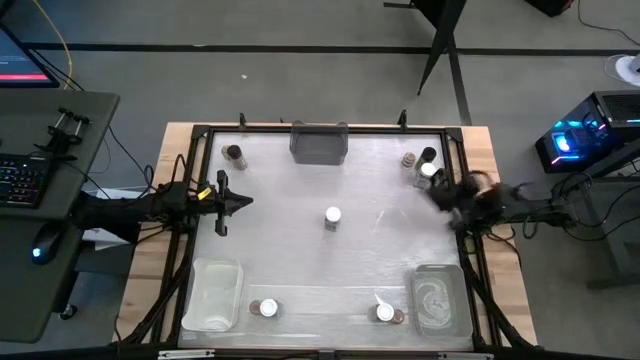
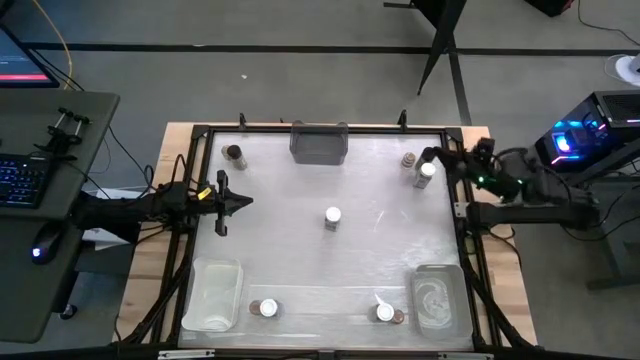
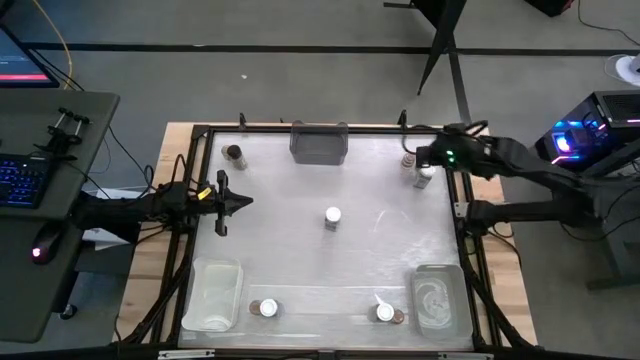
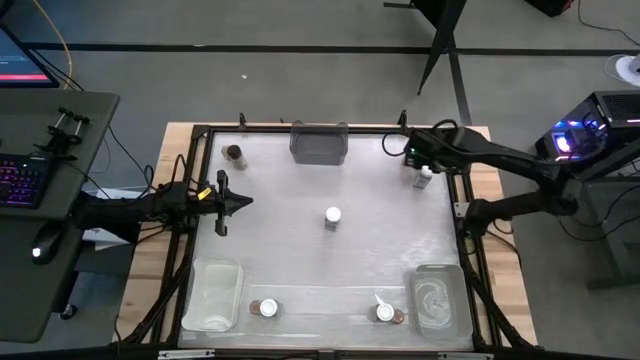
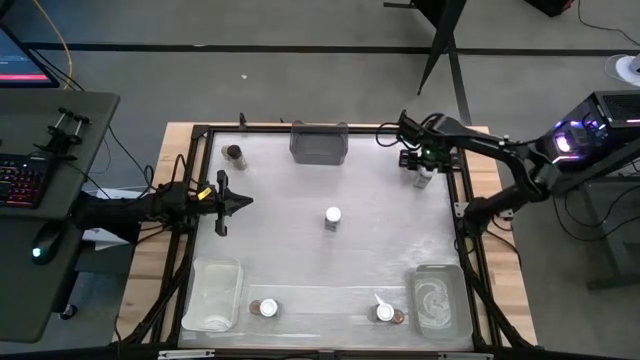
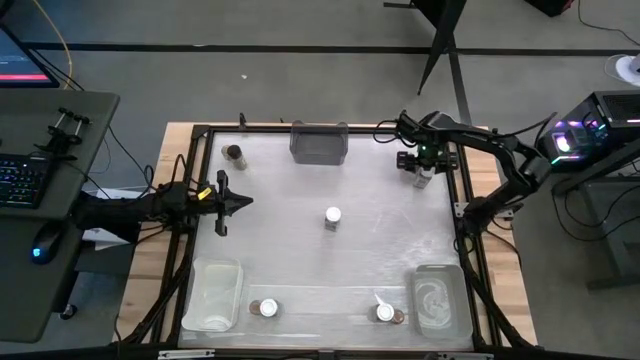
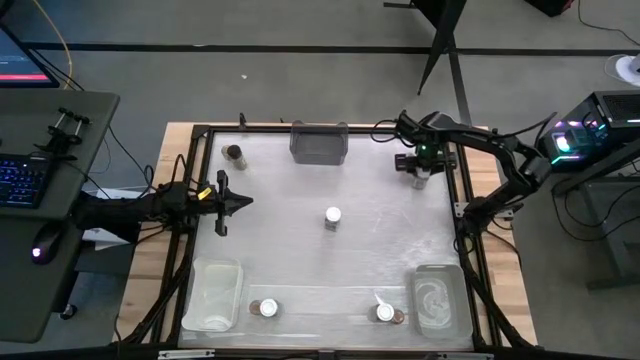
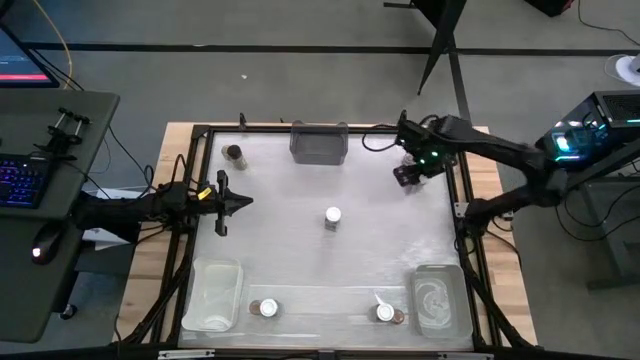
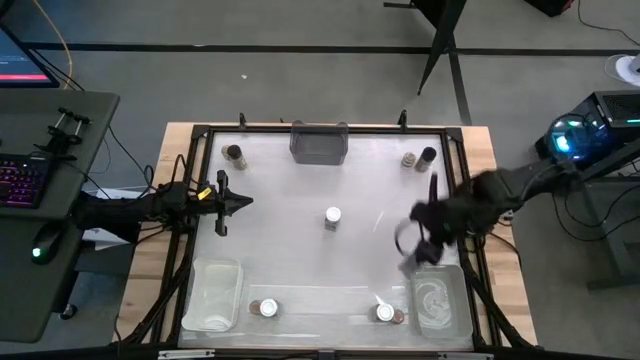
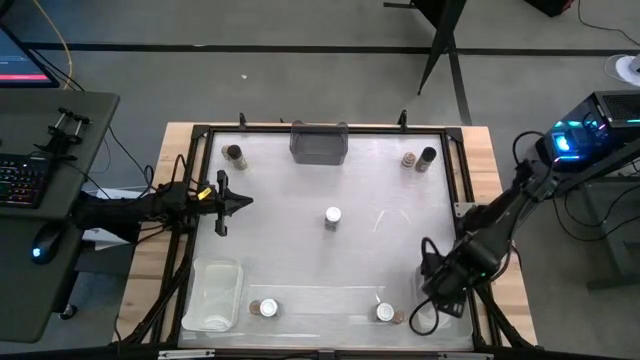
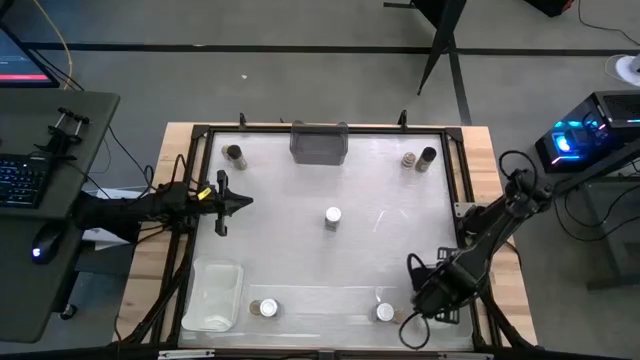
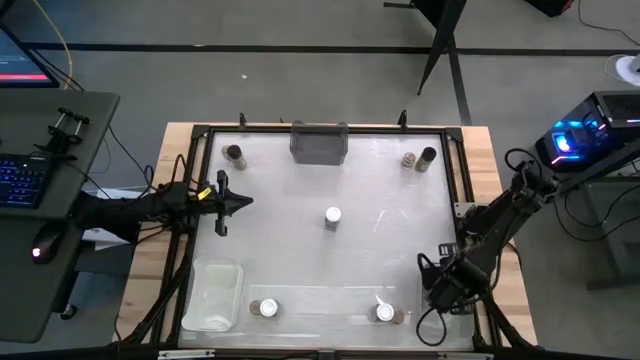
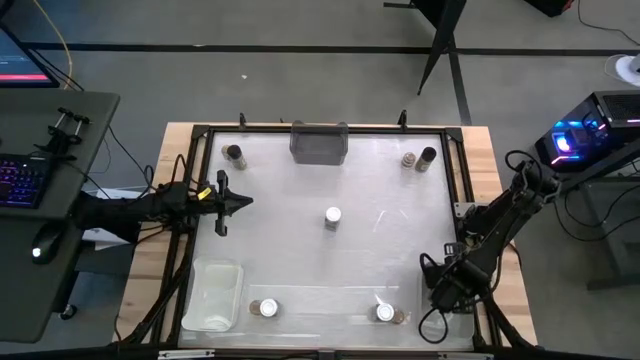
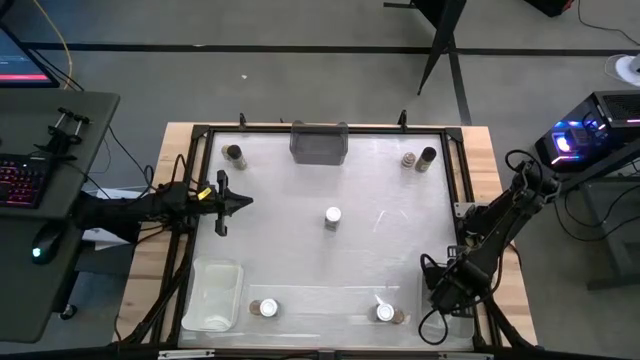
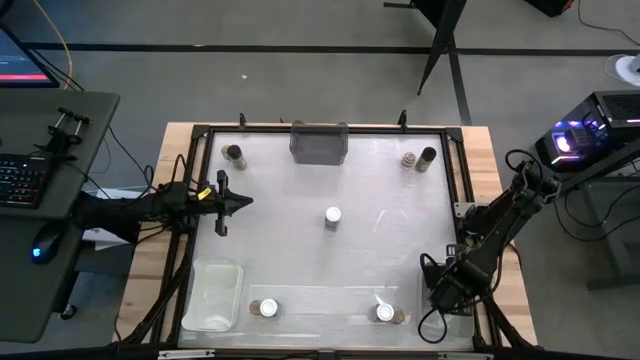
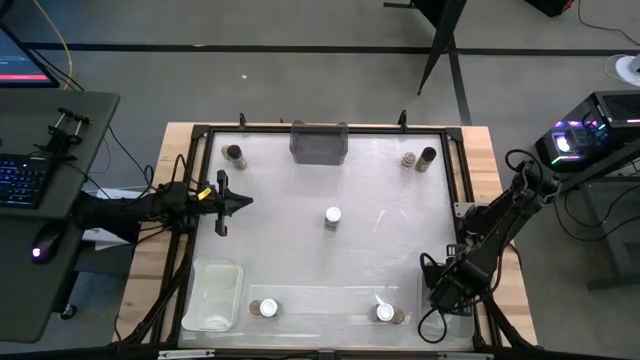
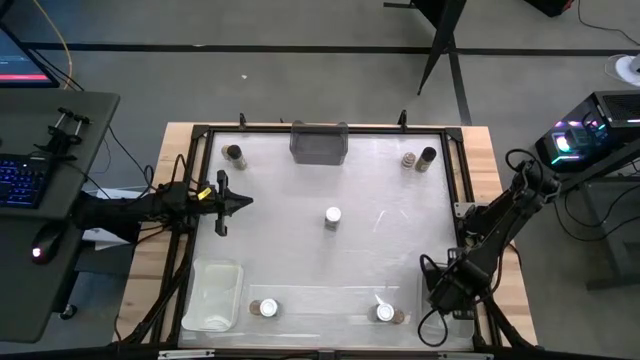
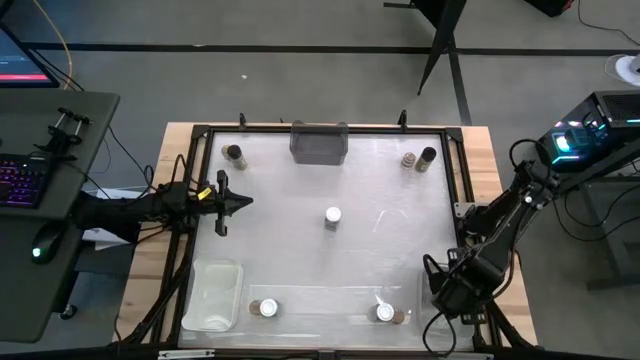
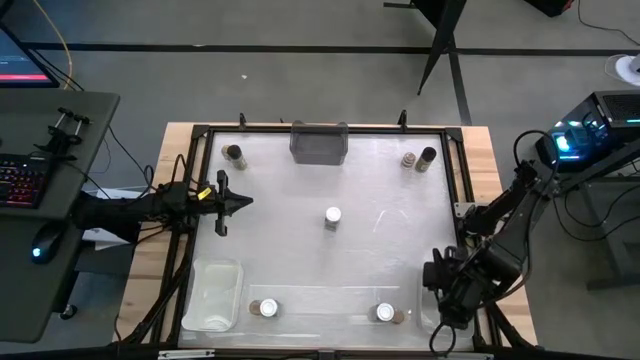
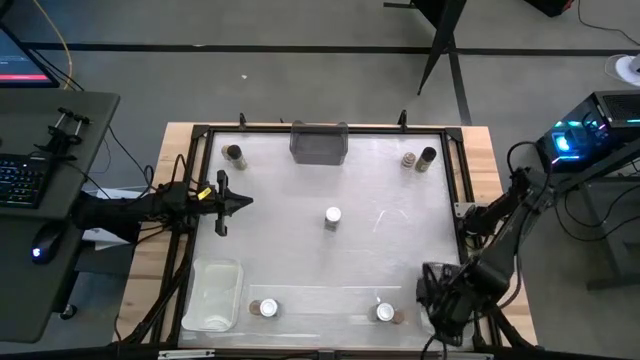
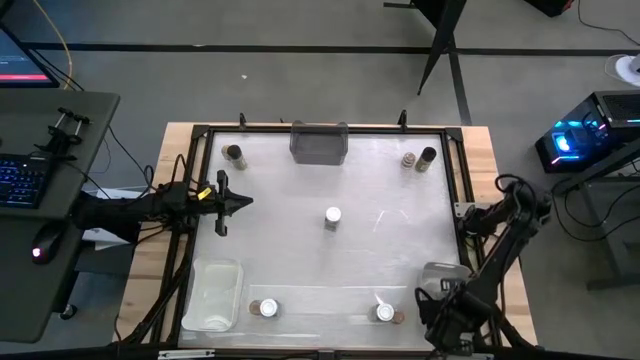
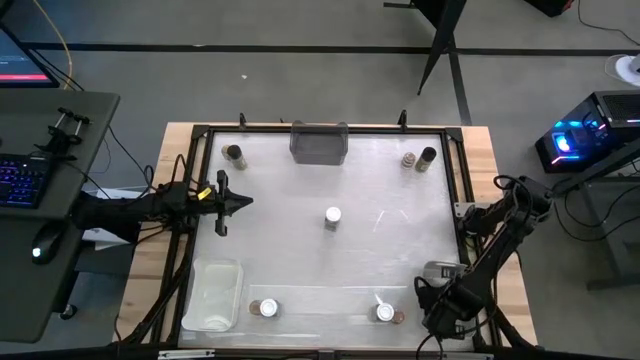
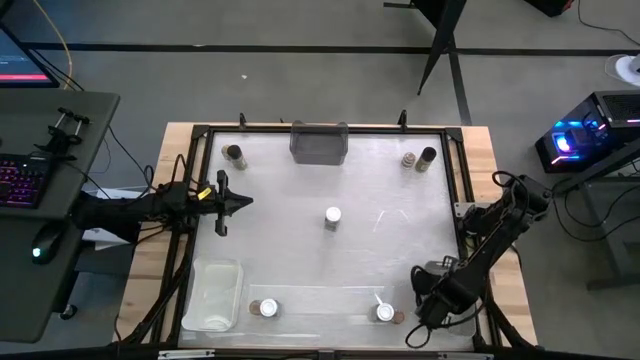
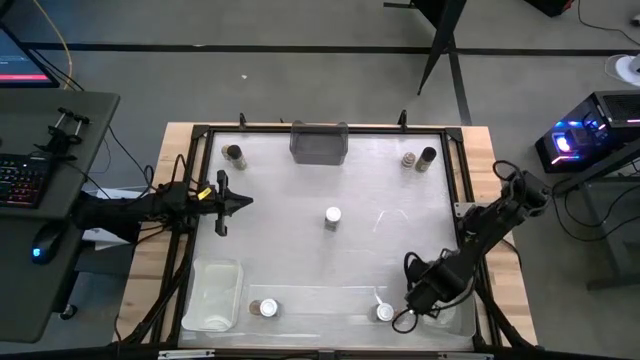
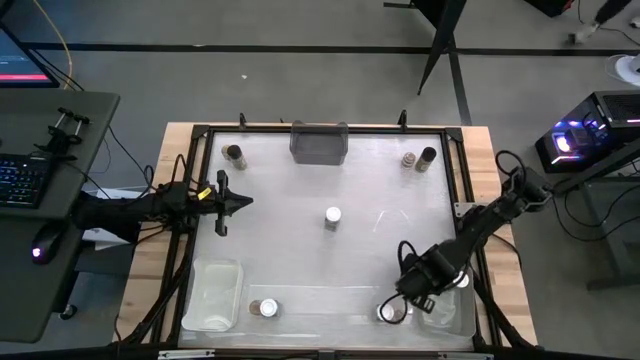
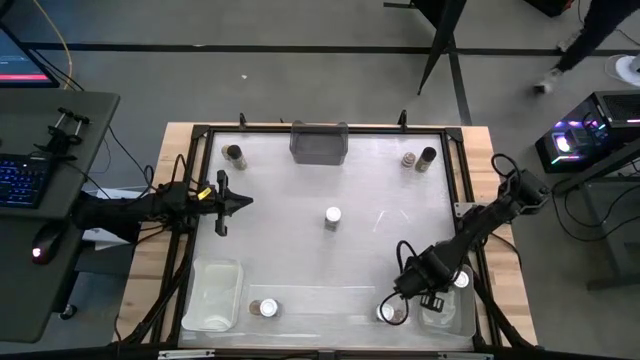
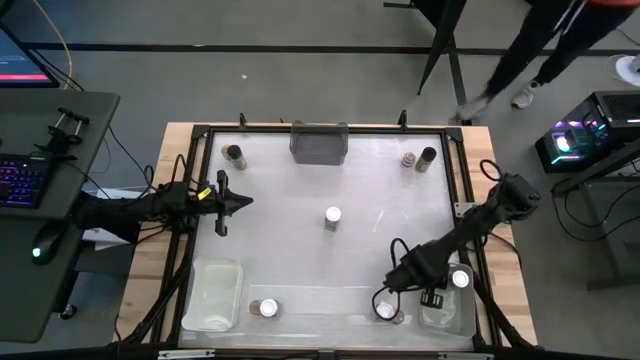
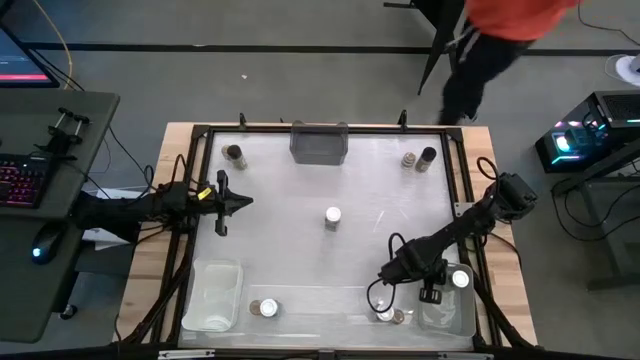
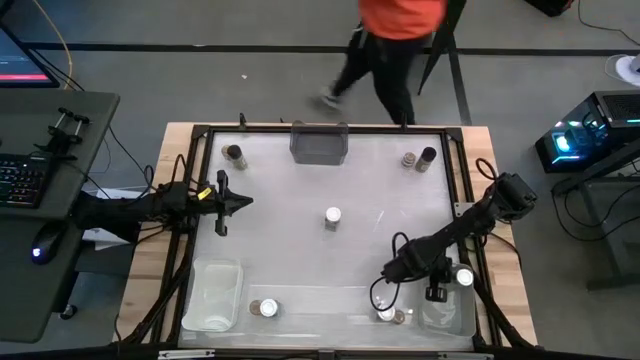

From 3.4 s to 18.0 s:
Task: Sort spices by type
Put the top right white seasoning bottle into the gray bin

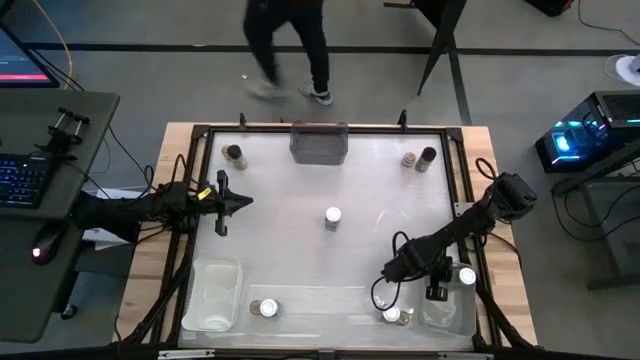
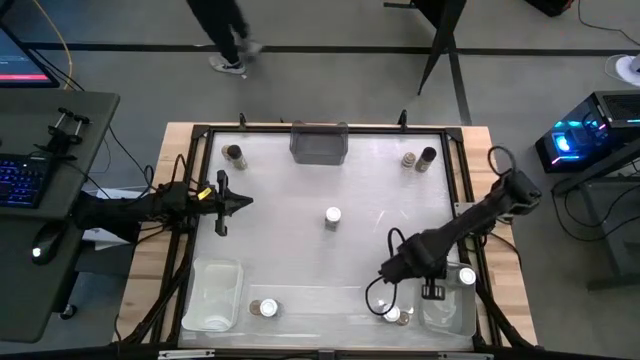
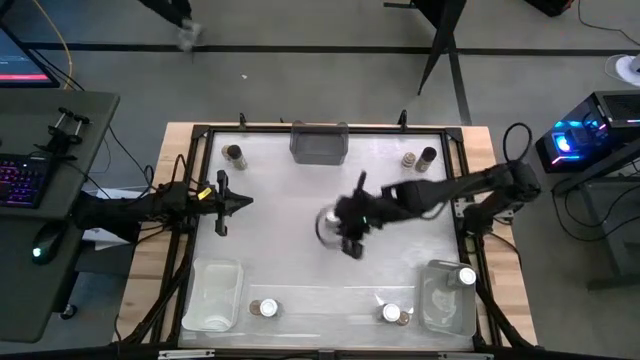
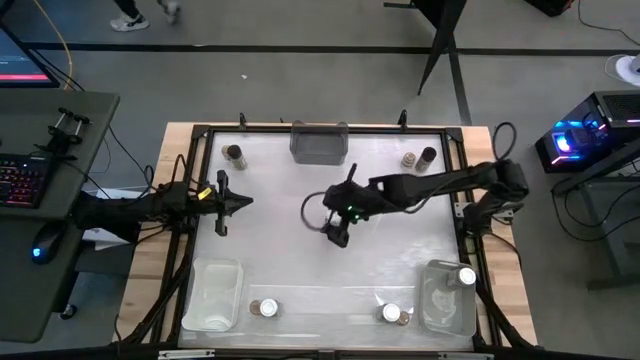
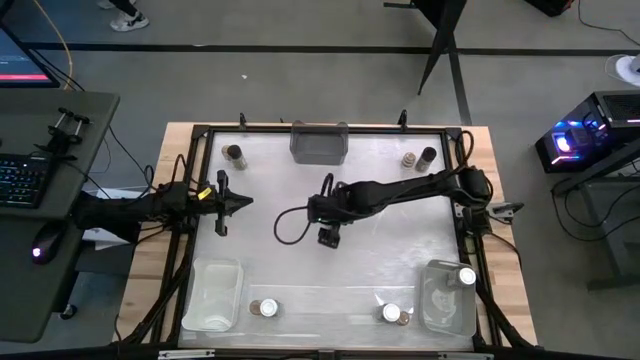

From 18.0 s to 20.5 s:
Put the top white seasoning bottle into the gray bin
